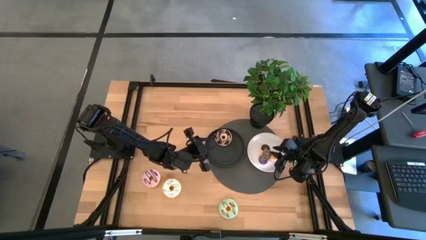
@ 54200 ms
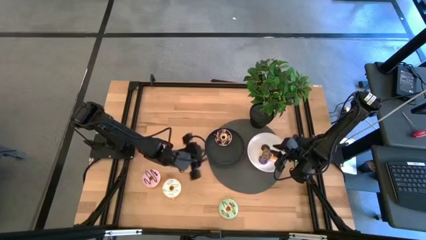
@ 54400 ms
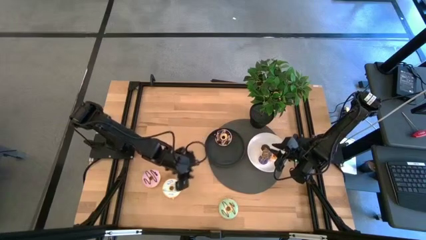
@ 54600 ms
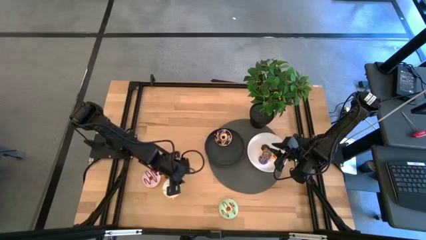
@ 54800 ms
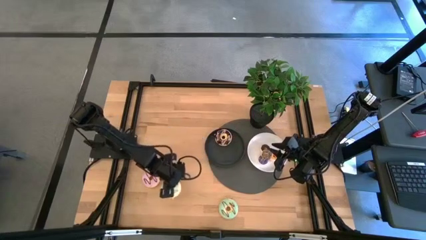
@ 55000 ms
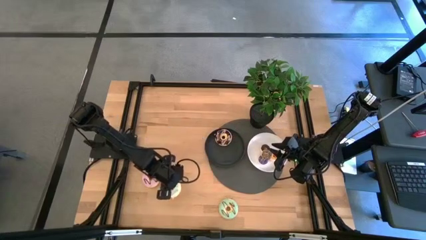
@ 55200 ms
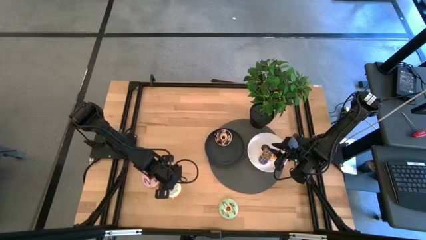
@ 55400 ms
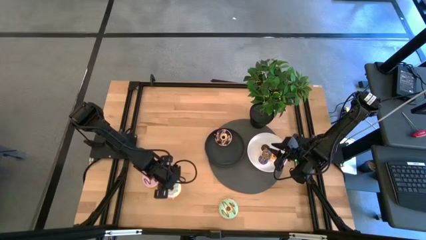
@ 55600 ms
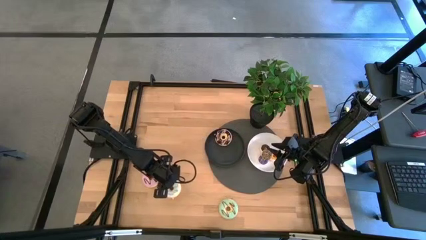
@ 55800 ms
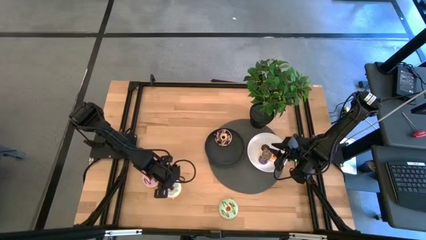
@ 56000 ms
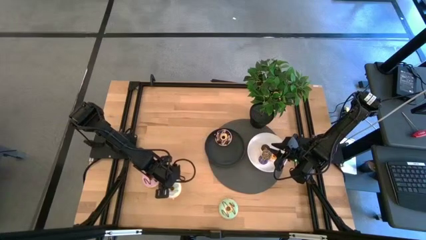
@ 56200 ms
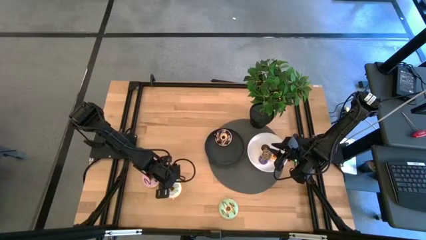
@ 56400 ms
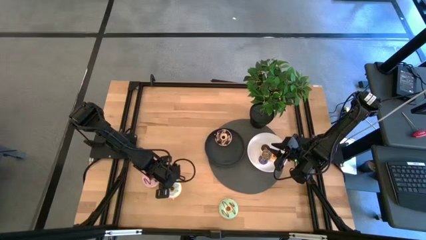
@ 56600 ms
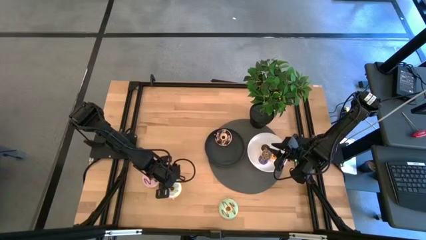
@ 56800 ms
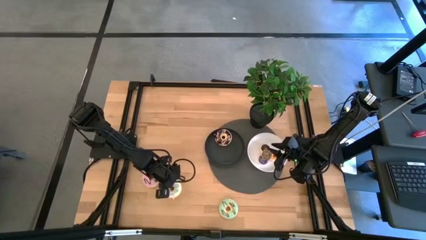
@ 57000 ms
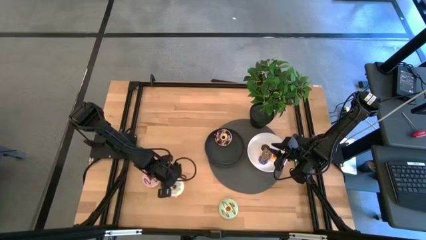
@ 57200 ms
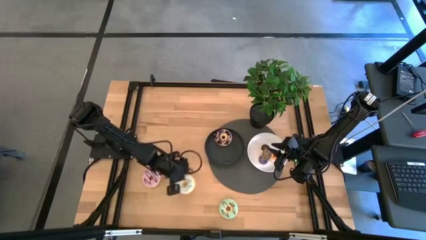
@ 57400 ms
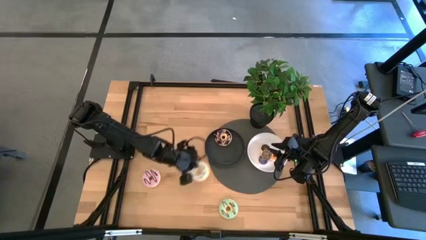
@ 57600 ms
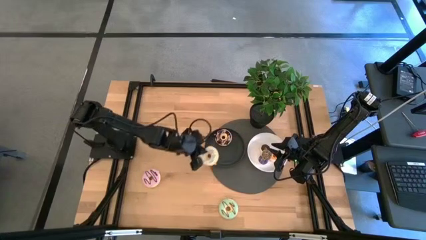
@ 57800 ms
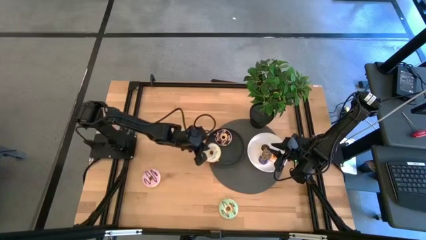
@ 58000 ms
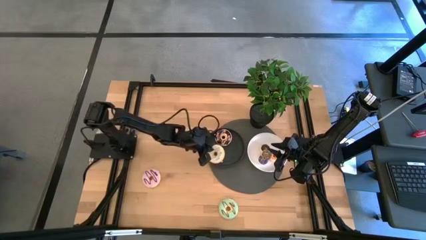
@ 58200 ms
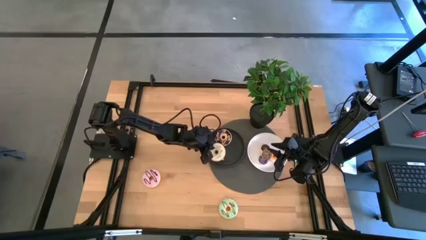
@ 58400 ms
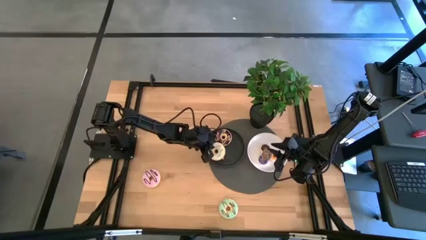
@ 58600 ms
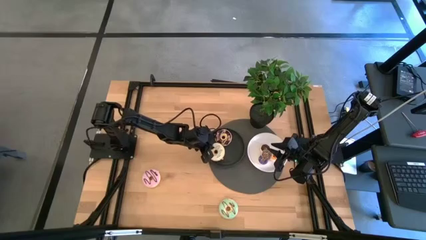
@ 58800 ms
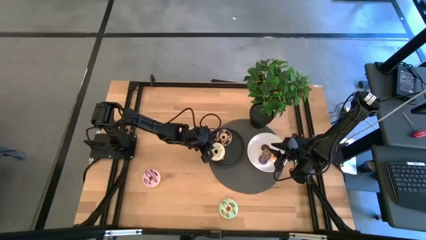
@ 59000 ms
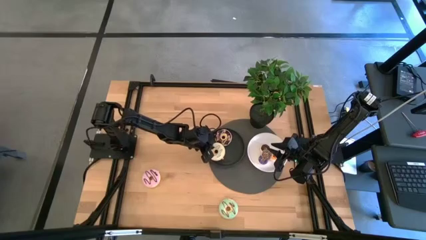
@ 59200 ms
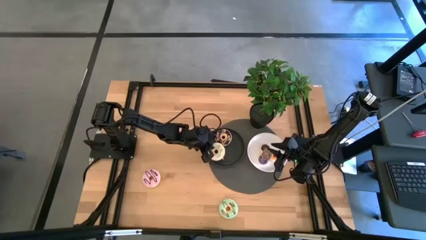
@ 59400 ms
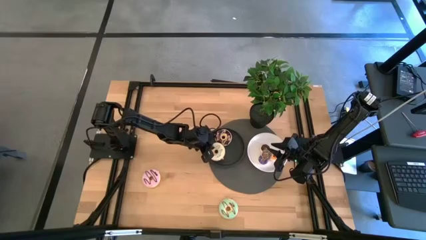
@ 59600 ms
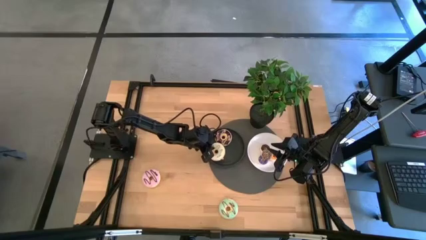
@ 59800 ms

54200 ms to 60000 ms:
Task: Pick & Place donuts
Put the large white donut on the black plate

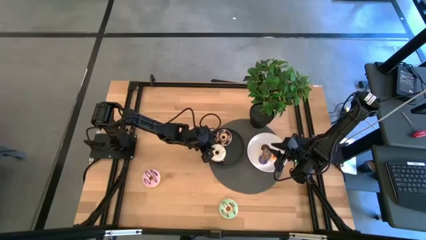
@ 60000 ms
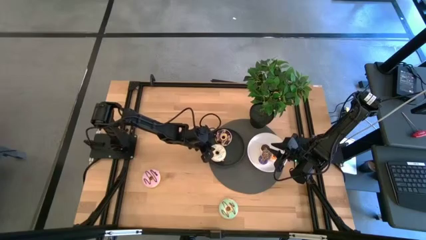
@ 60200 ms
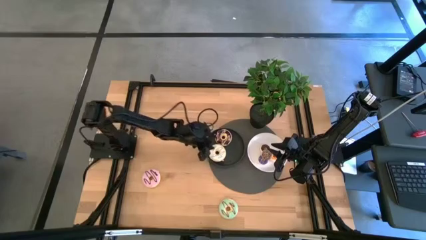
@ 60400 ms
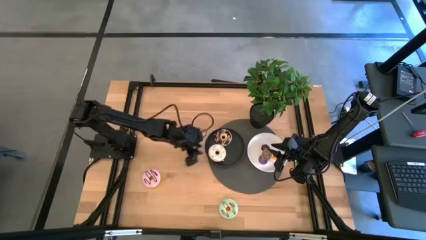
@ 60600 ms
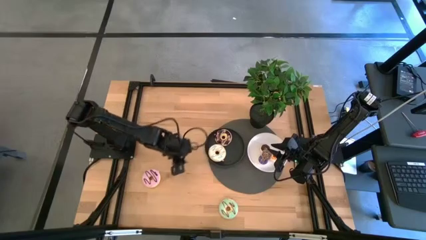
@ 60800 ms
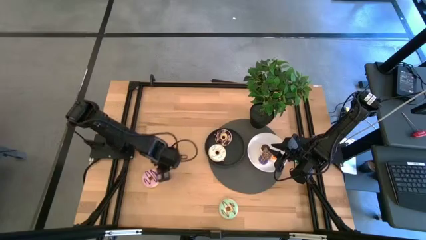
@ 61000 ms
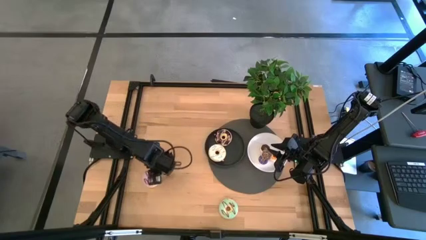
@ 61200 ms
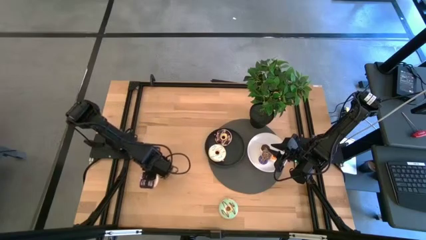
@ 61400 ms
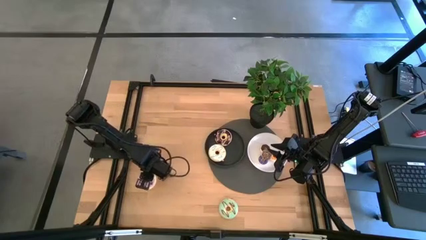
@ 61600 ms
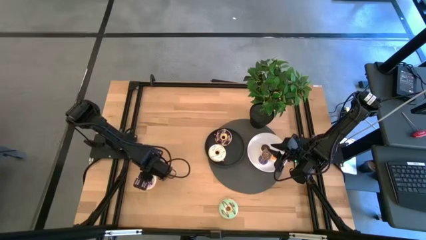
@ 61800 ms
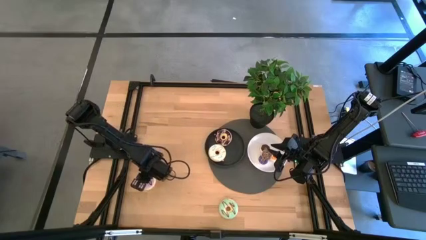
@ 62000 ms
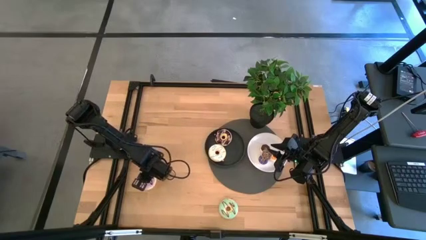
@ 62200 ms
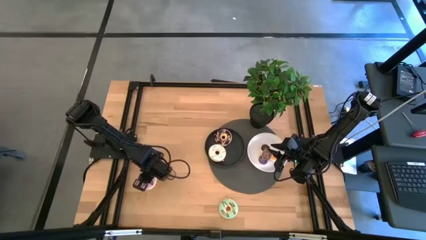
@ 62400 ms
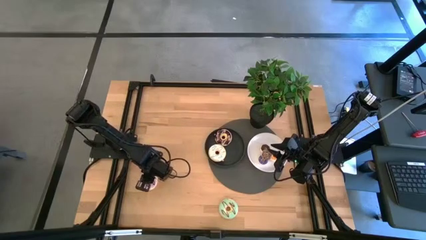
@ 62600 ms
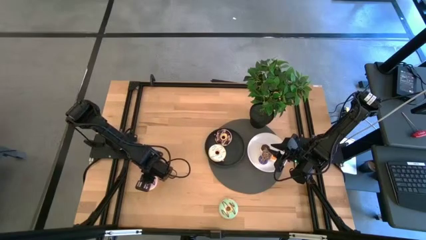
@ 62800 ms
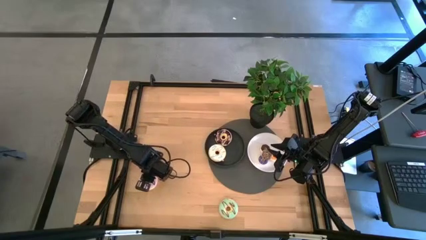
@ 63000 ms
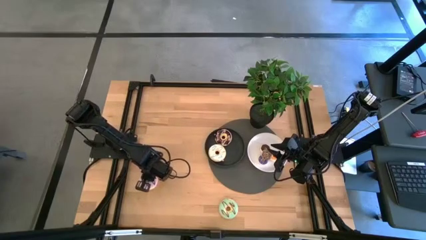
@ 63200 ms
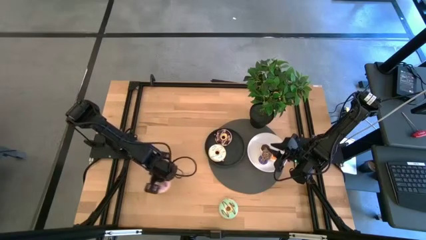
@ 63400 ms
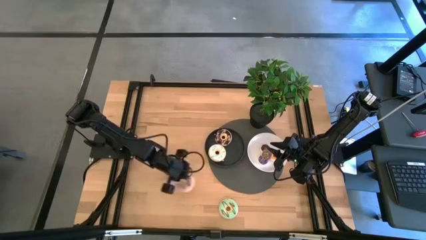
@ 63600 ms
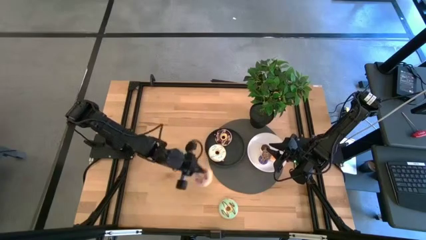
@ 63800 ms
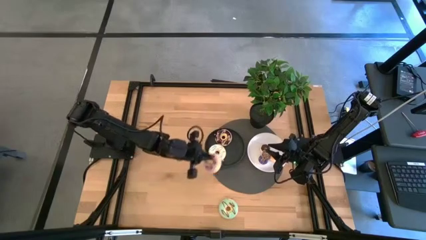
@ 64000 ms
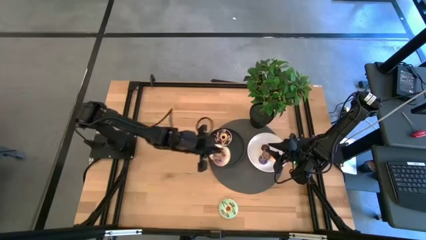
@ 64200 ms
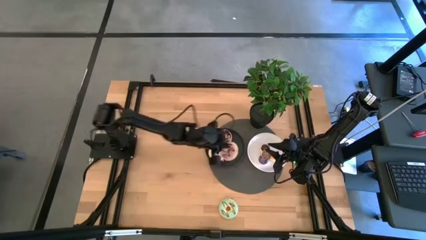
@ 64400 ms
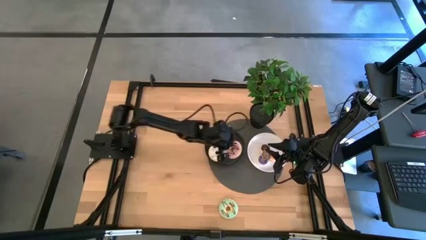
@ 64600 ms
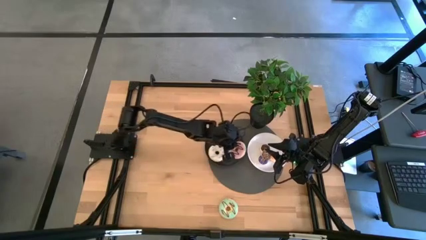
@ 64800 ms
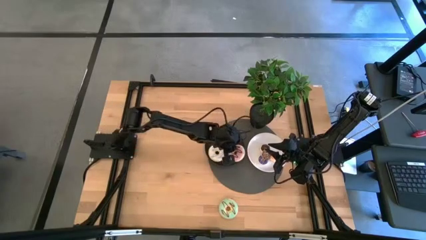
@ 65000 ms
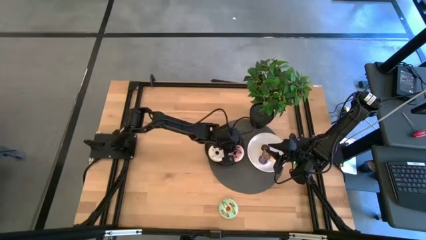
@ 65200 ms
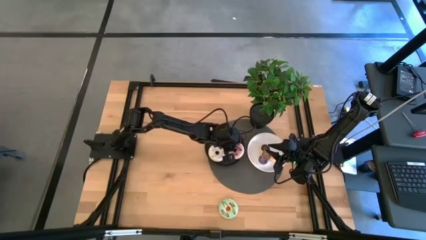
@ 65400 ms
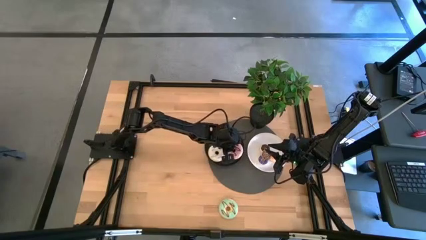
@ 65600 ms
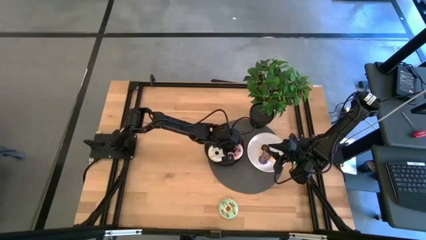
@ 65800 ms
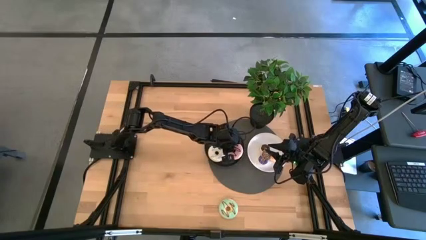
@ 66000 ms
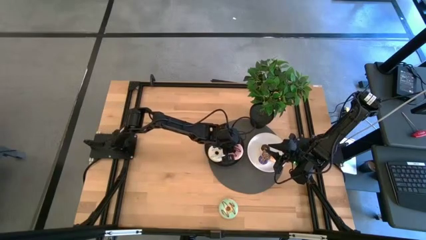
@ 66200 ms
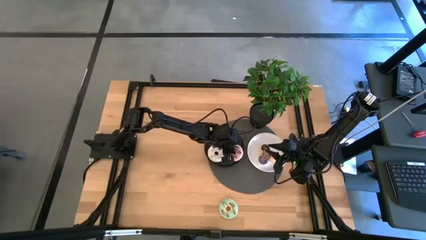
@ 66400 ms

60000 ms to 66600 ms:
Put the large pink donut on the black plate

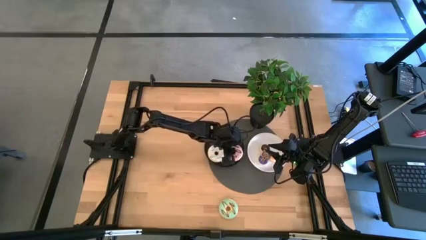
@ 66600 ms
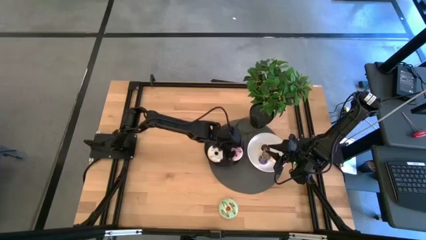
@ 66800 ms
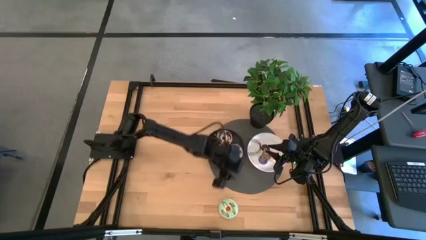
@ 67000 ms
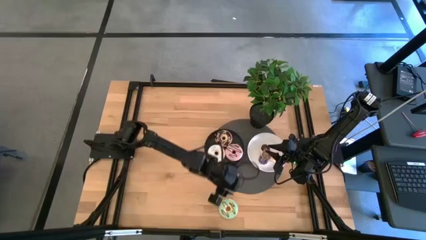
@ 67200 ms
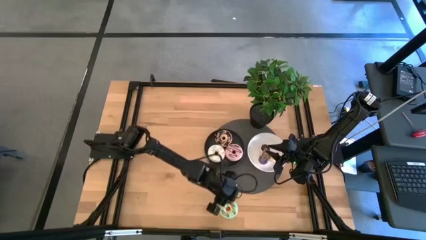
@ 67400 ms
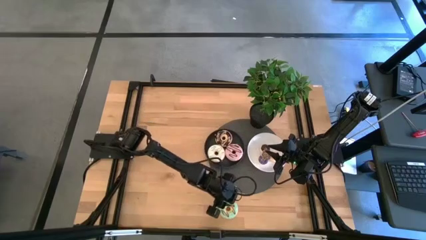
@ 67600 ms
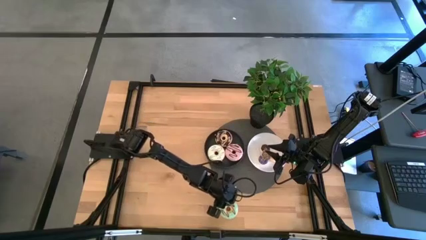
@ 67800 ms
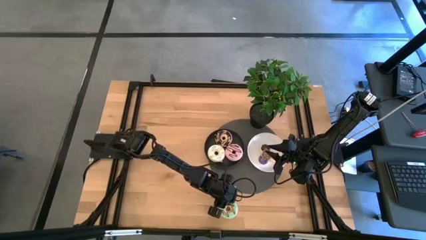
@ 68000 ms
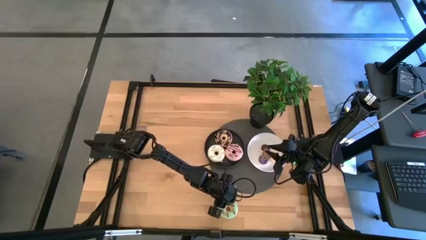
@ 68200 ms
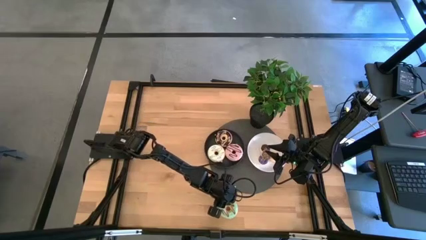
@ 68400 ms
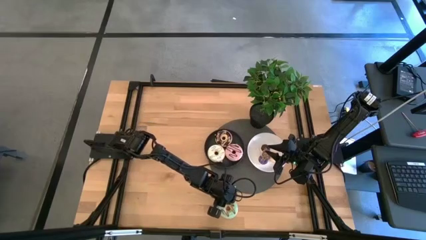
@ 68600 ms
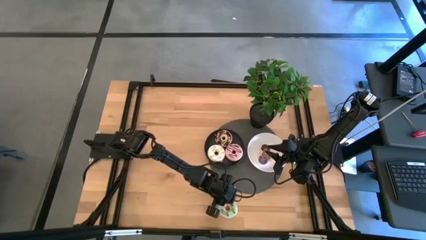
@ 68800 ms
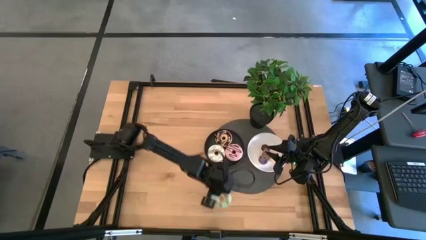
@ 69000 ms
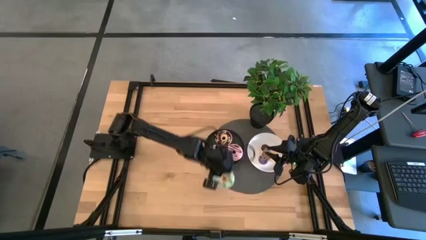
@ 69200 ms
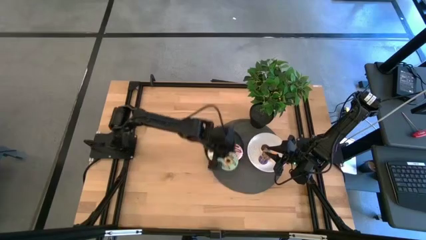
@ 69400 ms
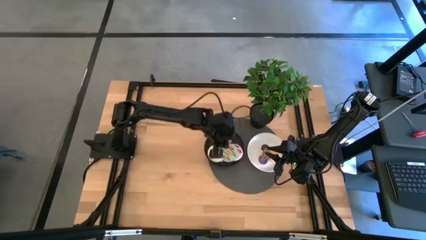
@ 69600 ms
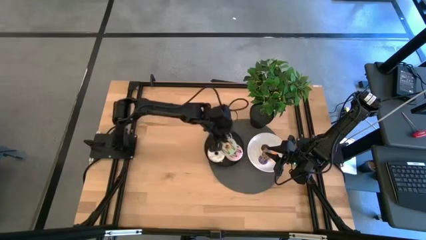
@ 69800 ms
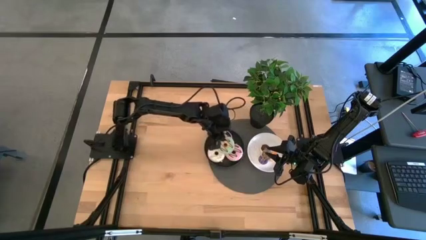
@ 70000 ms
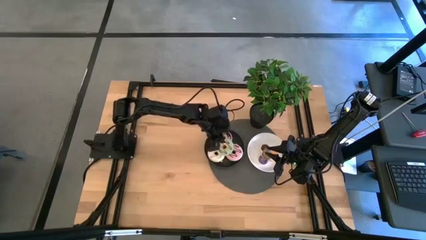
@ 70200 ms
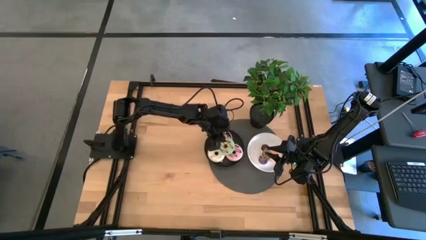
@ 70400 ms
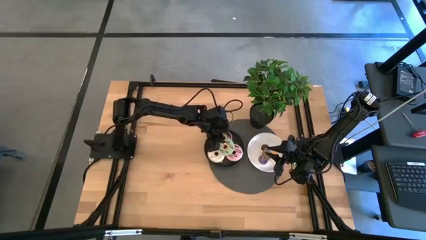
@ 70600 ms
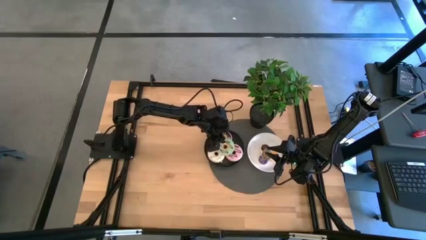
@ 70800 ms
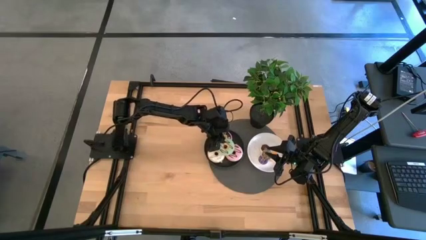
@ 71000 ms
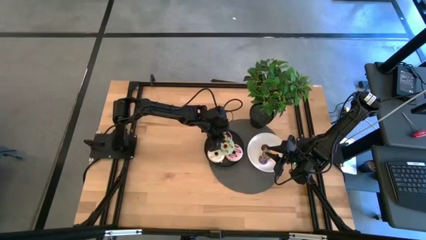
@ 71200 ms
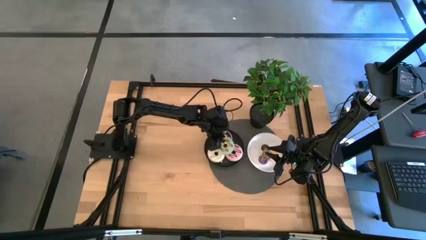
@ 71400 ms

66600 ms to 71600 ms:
Put the large green donut on the black plate
